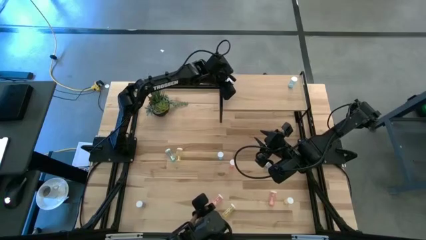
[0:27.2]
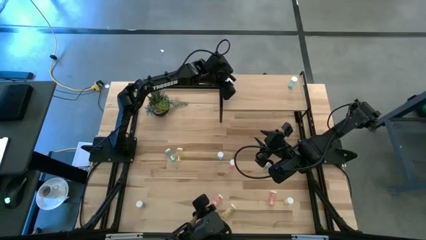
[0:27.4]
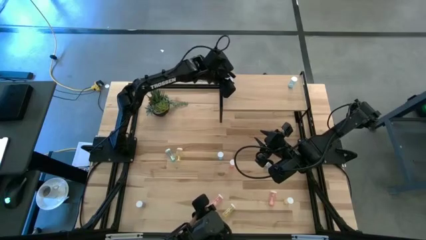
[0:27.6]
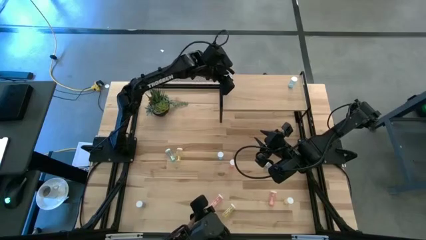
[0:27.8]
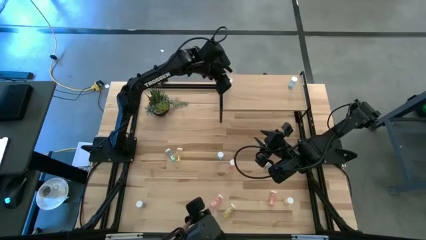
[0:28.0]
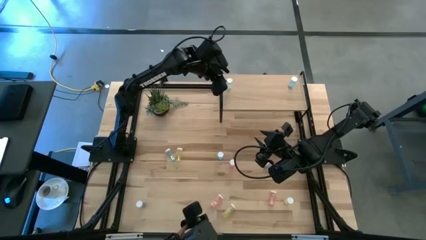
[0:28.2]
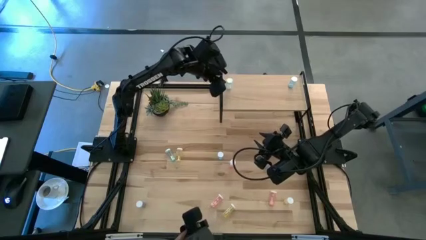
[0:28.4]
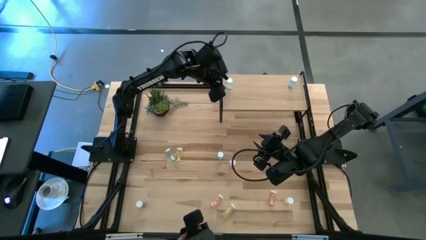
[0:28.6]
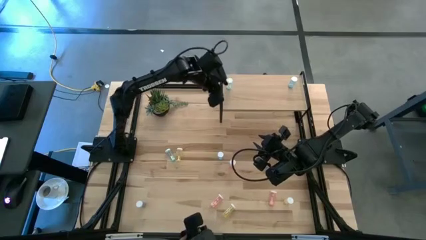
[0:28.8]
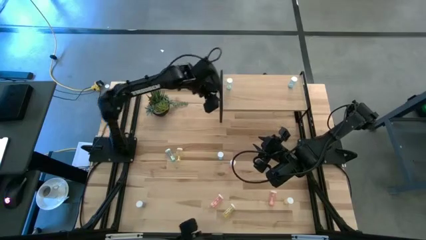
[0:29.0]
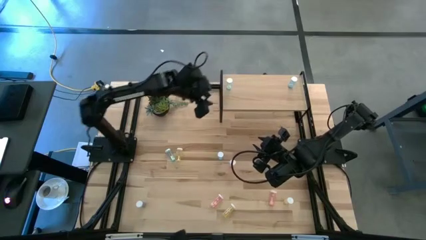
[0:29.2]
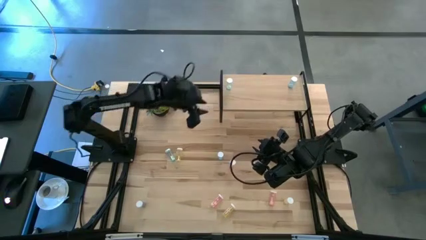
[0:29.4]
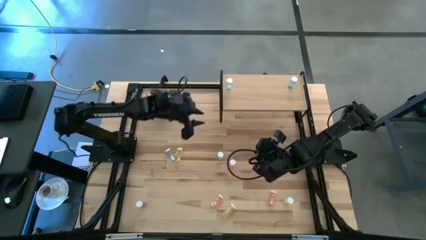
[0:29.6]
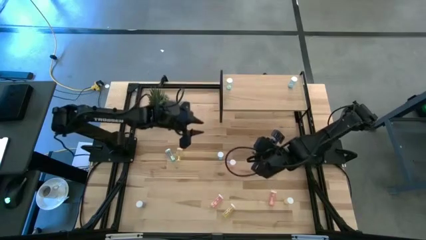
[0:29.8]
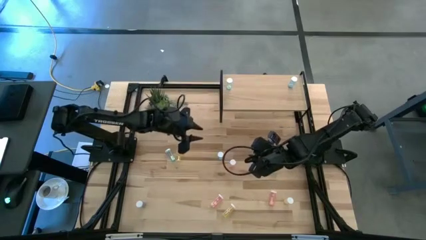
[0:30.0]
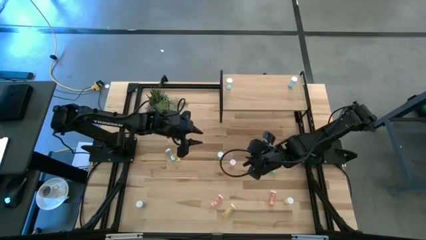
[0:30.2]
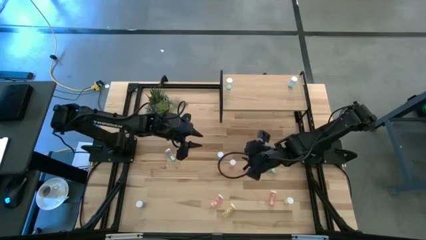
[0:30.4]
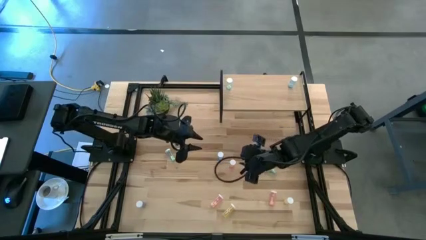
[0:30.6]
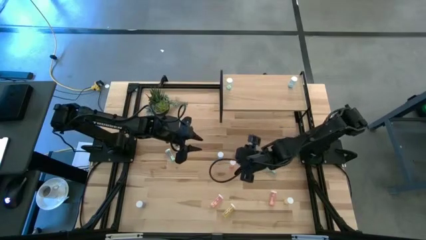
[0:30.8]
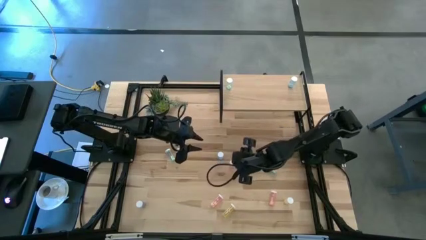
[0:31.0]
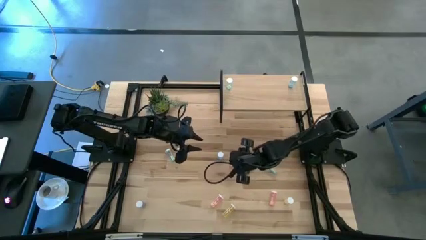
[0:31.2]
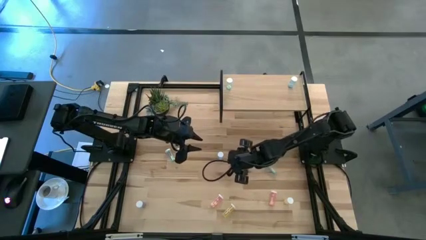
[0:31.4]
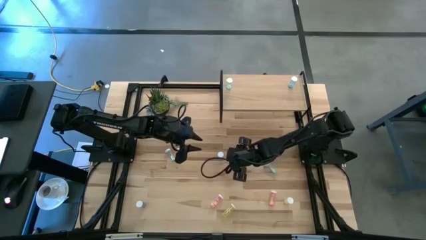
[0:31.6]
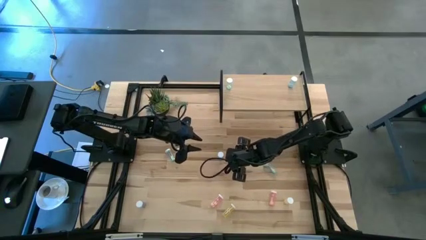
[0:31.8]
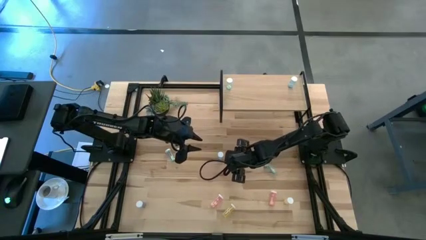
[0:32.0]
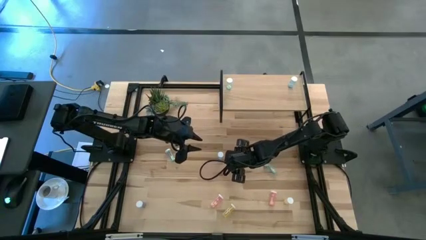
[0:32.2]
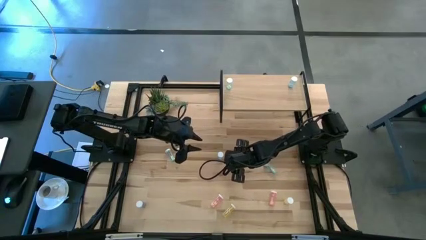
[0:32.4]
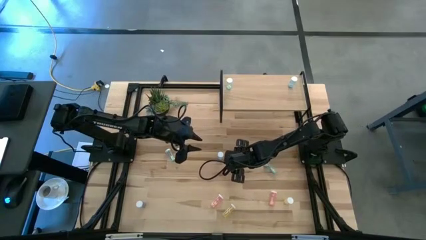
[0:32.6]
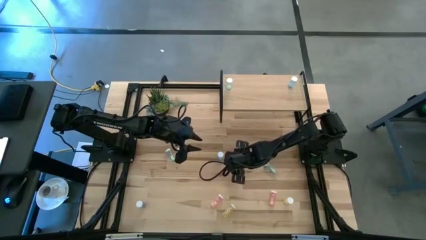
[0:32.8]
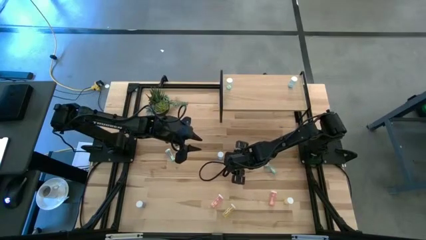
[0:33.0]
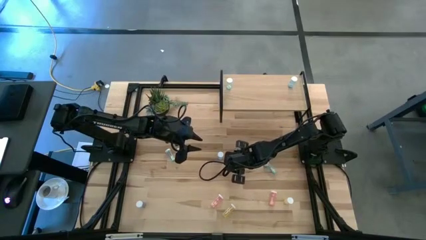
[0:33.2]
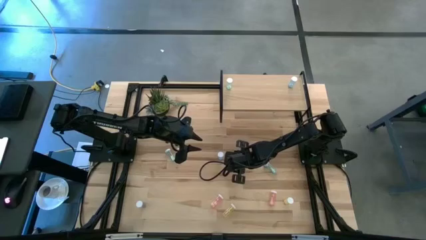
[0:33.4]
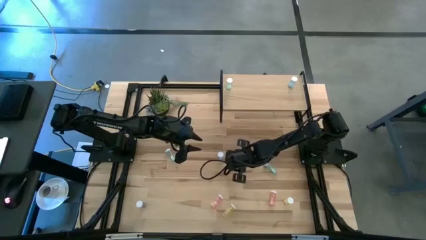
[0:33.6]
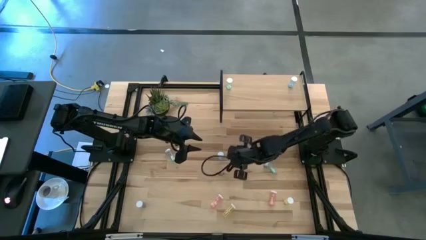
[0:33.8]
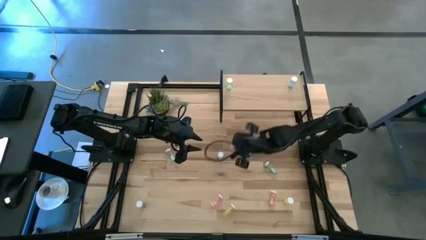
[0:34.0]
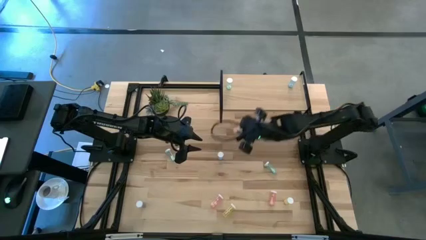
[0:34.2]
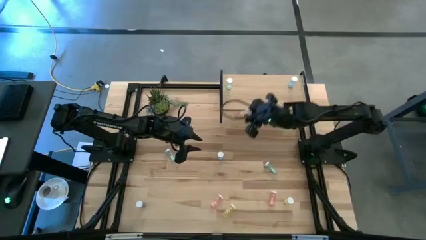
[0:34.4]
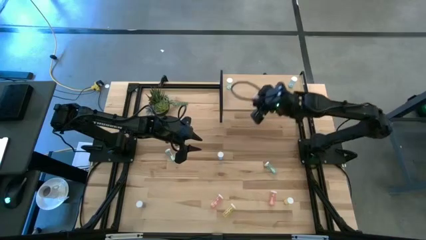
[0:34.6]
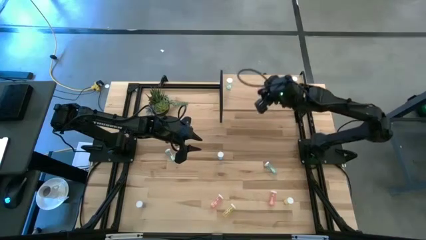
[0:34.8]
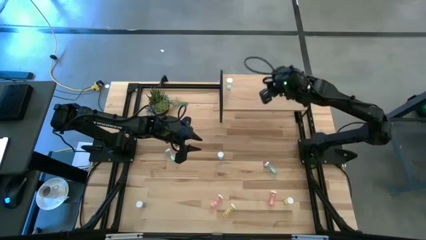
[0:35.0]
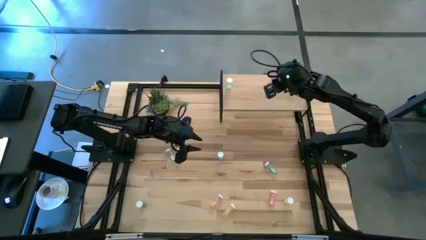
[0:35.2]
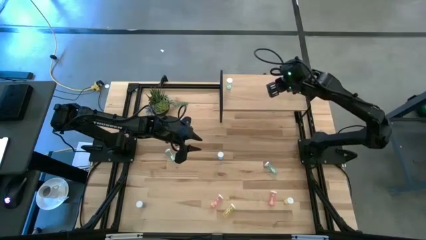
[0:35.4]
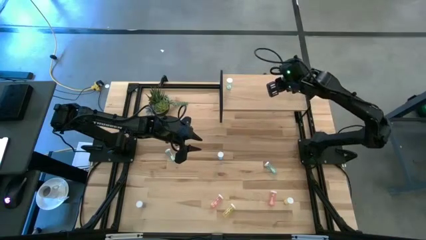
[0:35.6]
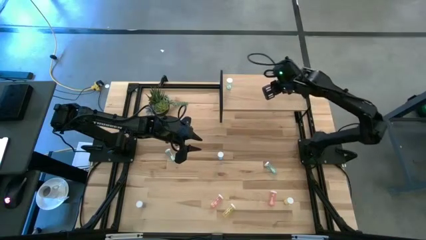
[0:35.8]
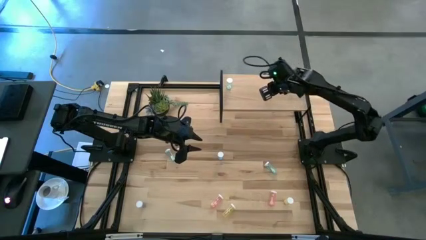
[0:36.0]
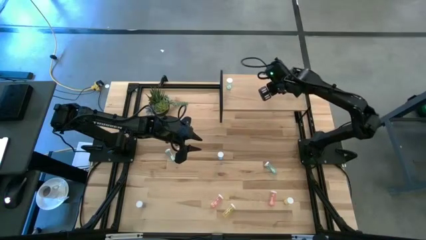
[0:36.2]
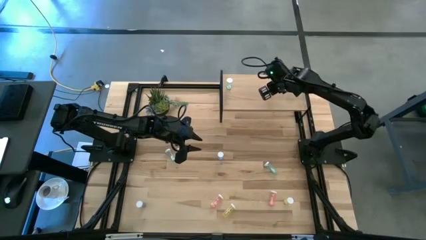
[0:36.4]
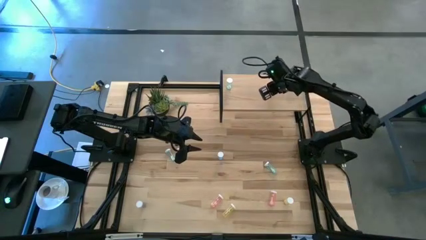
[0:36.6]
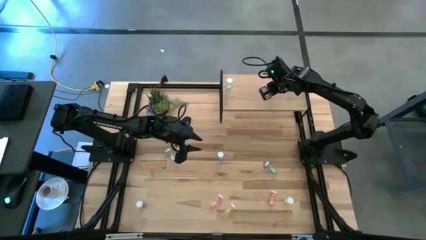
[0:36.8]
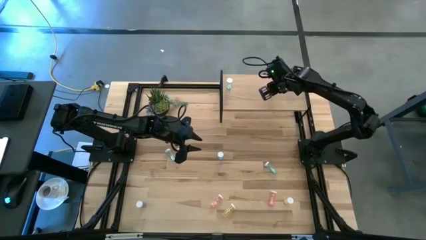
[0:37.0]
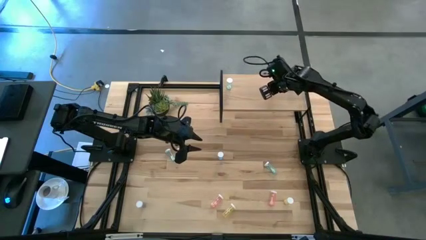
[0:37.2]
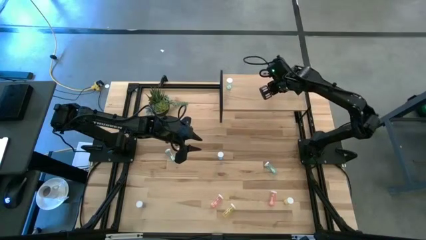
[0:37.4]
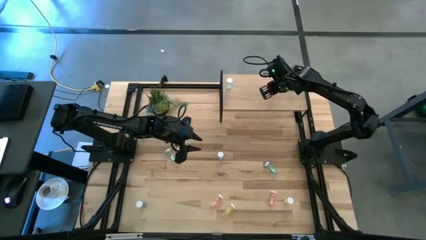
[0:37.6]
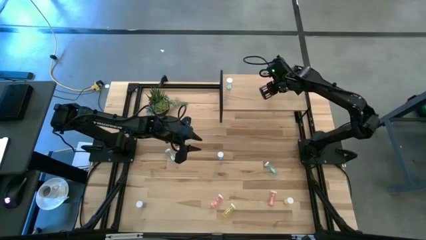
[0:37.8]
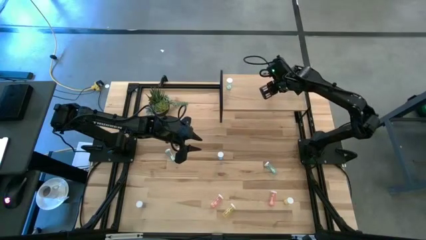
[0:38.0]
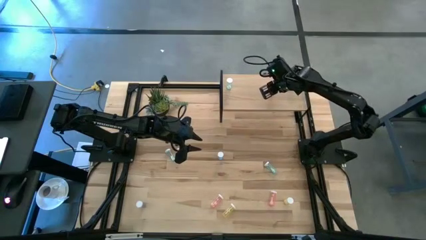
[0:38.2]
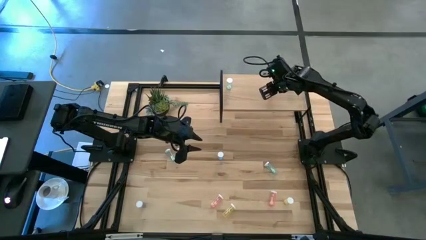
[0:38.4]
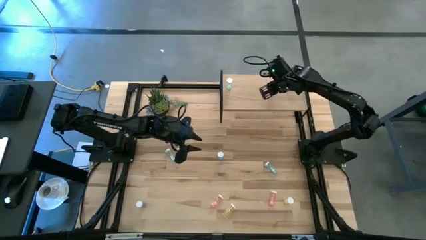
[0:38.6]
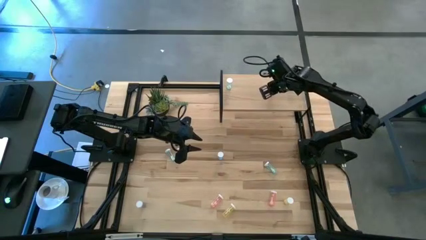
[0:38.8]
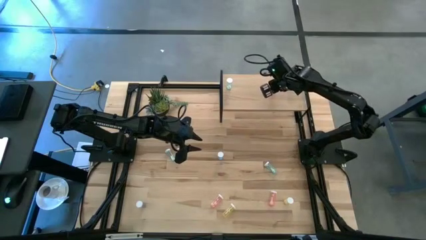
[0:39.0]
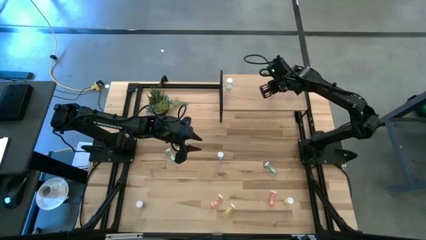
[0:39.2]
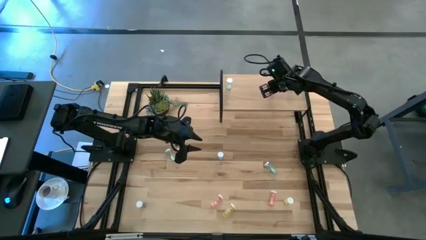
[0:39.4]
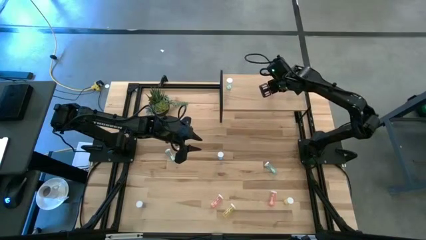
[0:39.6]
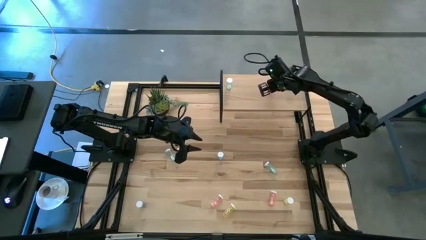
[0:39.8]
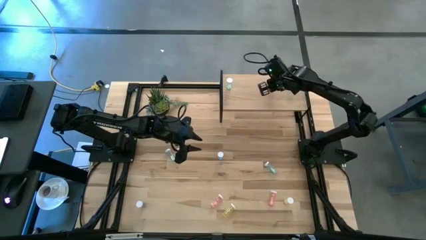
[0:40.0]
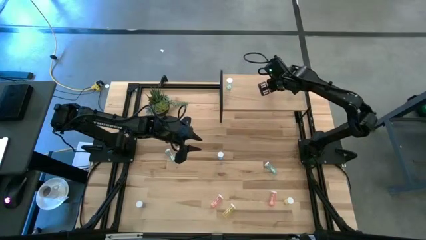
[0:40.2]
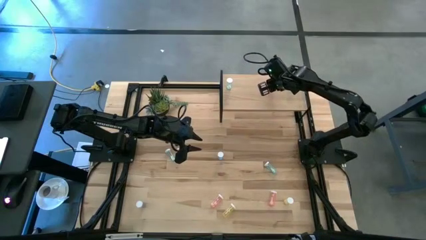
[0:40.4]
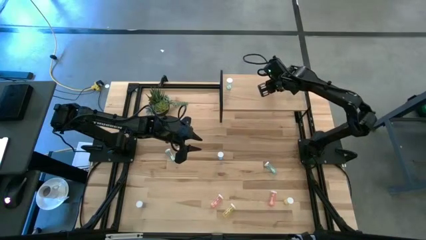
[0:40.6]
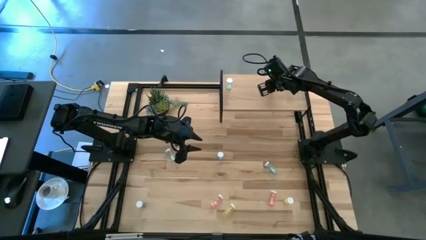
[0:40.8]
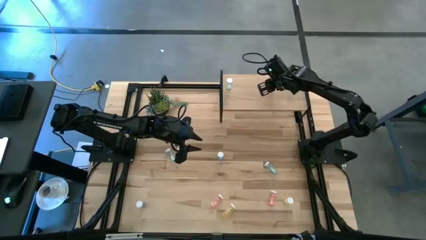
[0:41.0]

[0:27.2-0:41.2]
Task: Pick and place medicine bottles onto shelf by color
Put the pink pill bottle on the shelf
